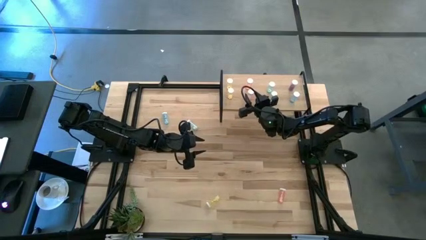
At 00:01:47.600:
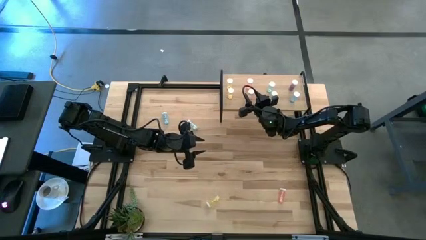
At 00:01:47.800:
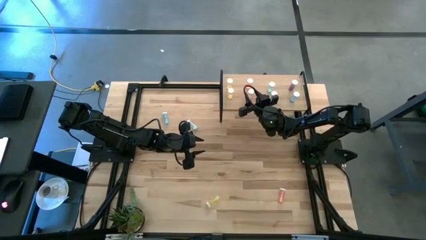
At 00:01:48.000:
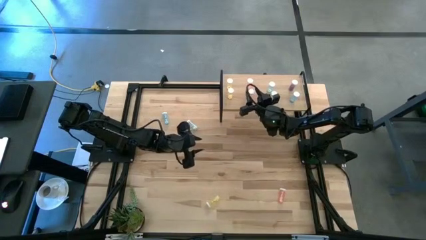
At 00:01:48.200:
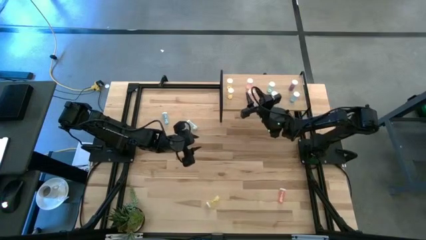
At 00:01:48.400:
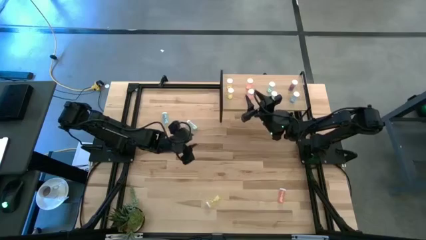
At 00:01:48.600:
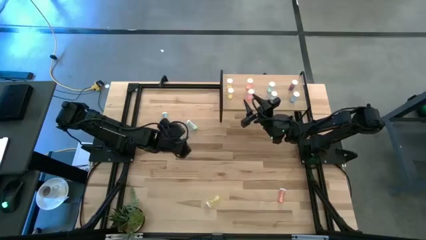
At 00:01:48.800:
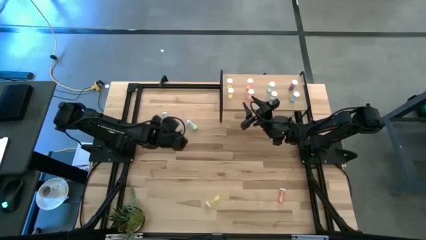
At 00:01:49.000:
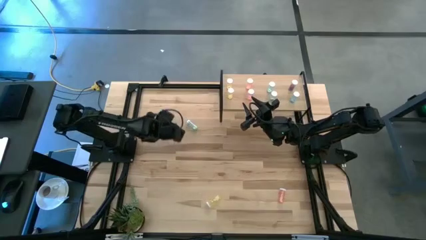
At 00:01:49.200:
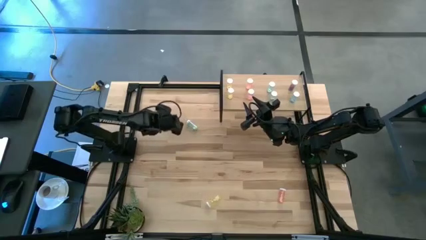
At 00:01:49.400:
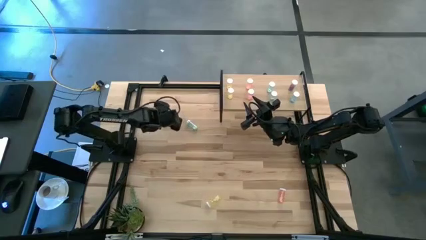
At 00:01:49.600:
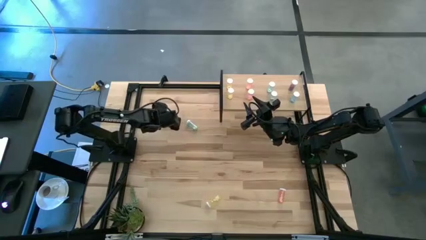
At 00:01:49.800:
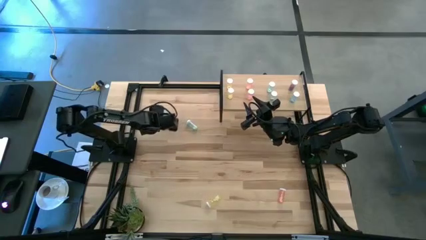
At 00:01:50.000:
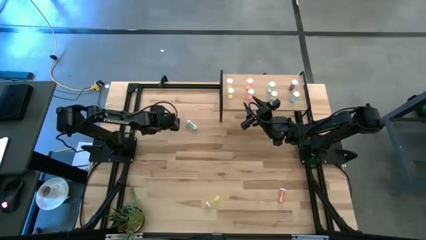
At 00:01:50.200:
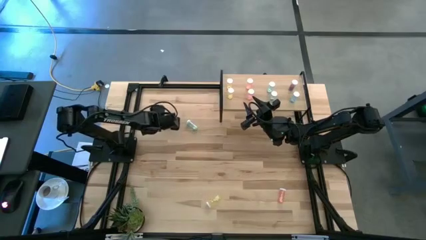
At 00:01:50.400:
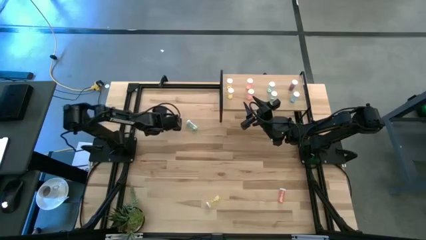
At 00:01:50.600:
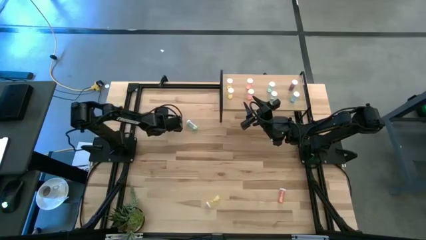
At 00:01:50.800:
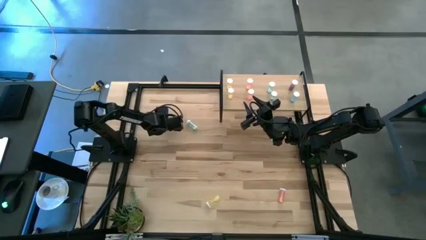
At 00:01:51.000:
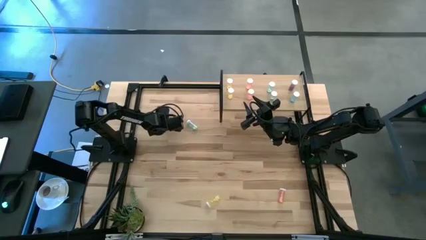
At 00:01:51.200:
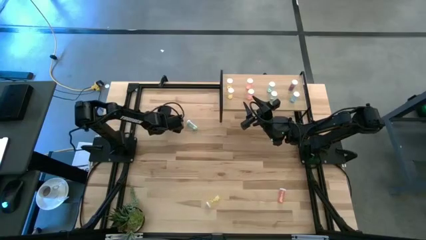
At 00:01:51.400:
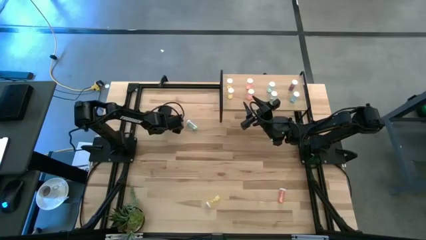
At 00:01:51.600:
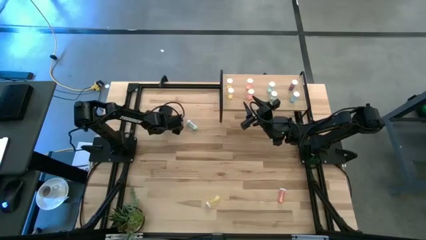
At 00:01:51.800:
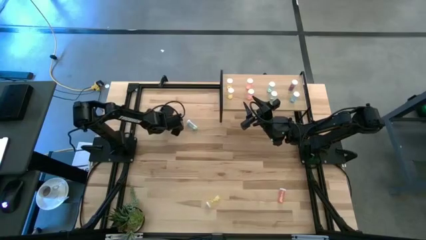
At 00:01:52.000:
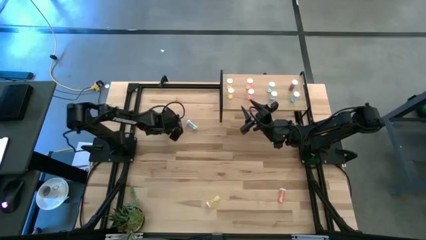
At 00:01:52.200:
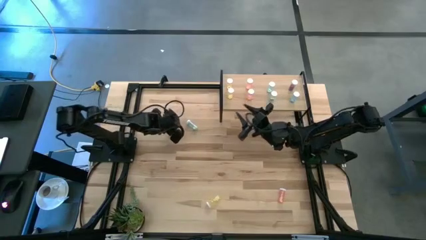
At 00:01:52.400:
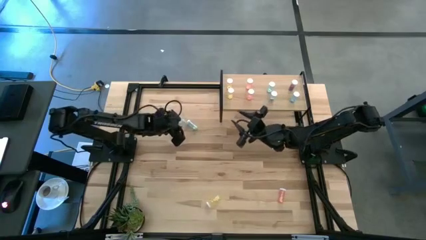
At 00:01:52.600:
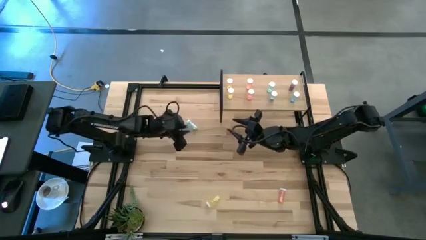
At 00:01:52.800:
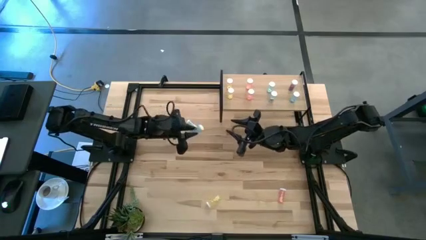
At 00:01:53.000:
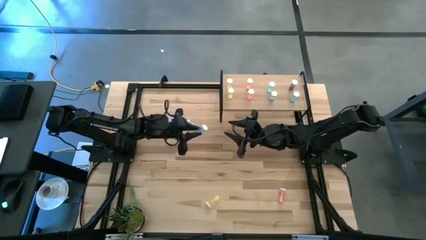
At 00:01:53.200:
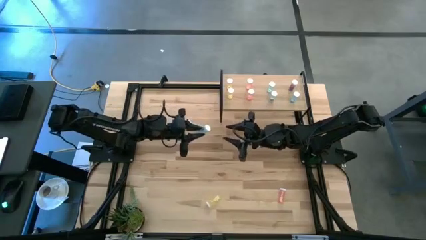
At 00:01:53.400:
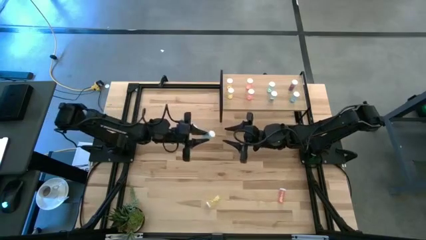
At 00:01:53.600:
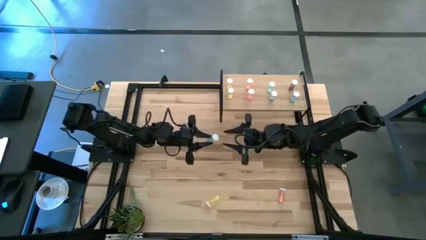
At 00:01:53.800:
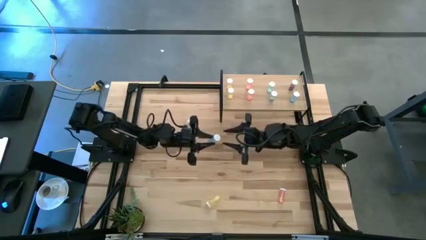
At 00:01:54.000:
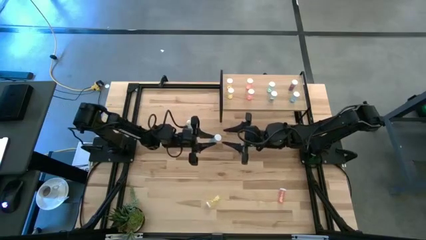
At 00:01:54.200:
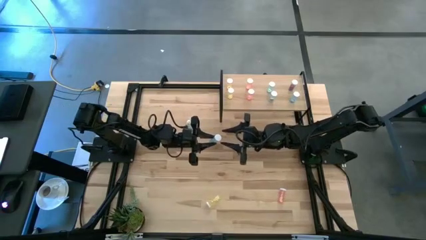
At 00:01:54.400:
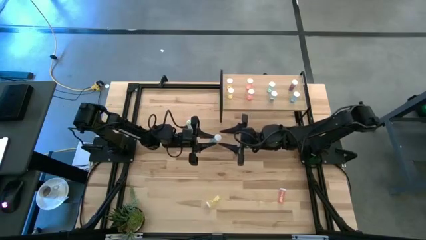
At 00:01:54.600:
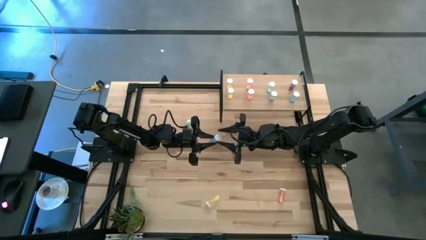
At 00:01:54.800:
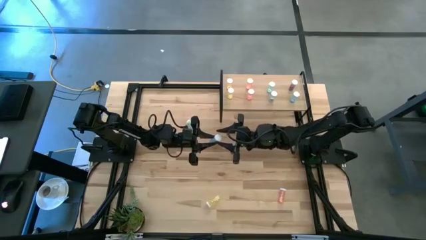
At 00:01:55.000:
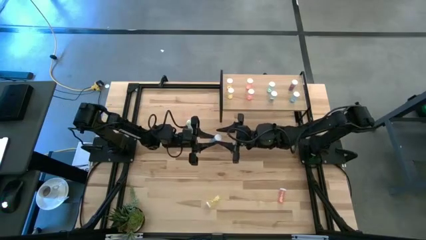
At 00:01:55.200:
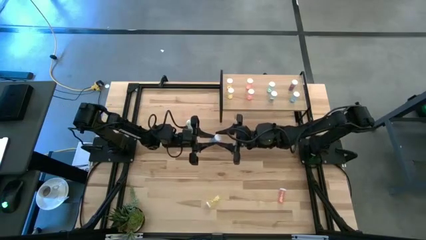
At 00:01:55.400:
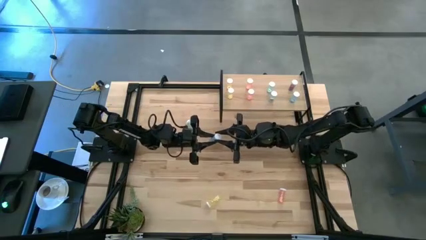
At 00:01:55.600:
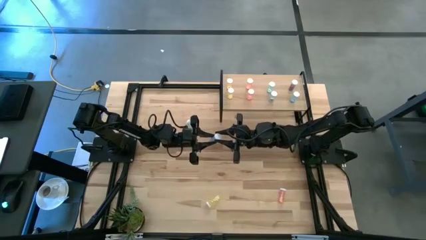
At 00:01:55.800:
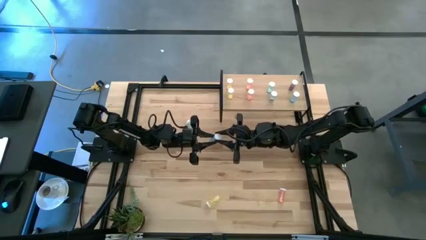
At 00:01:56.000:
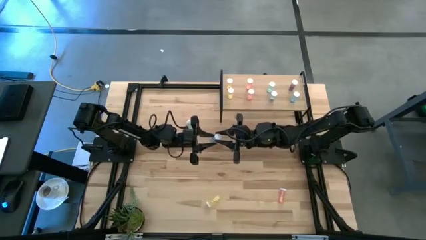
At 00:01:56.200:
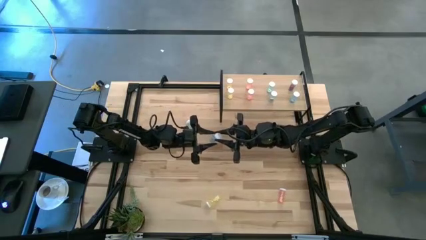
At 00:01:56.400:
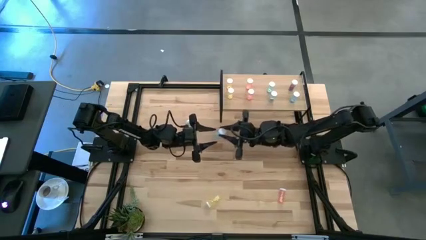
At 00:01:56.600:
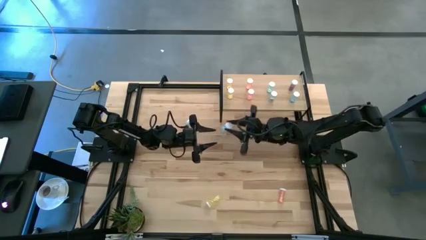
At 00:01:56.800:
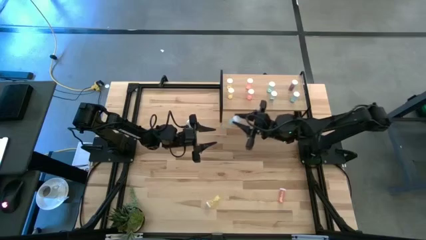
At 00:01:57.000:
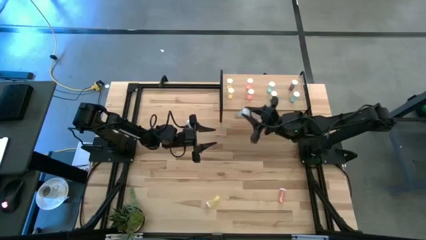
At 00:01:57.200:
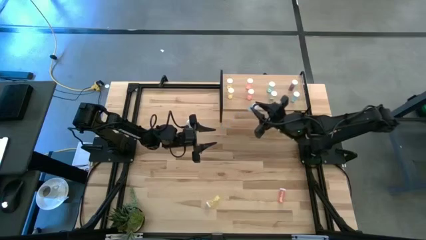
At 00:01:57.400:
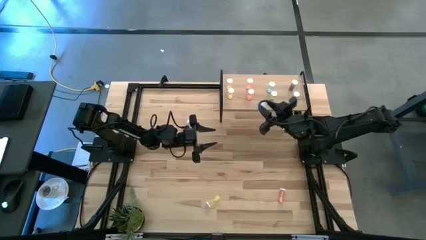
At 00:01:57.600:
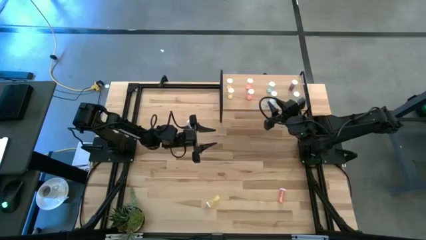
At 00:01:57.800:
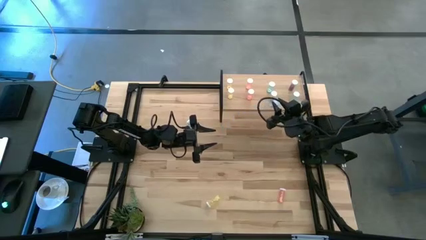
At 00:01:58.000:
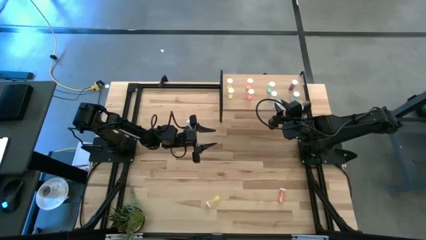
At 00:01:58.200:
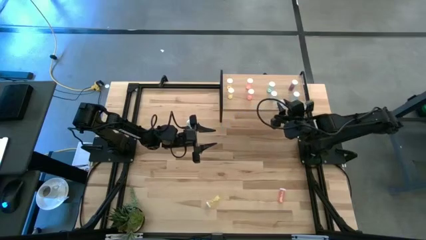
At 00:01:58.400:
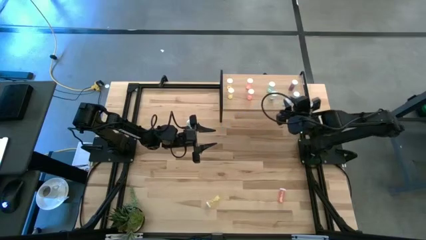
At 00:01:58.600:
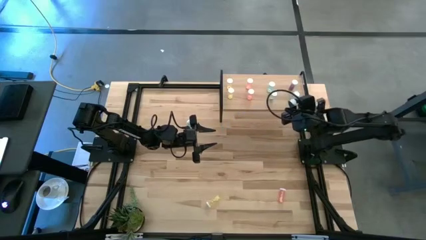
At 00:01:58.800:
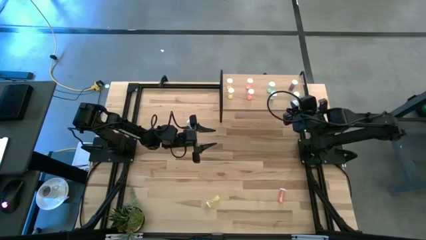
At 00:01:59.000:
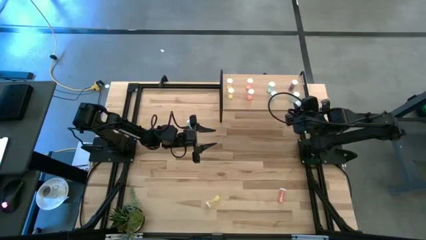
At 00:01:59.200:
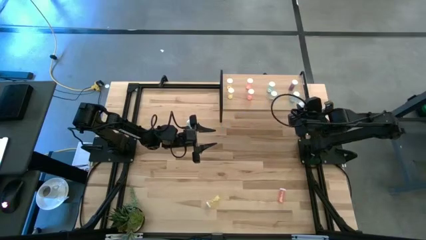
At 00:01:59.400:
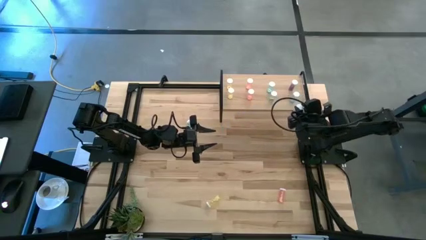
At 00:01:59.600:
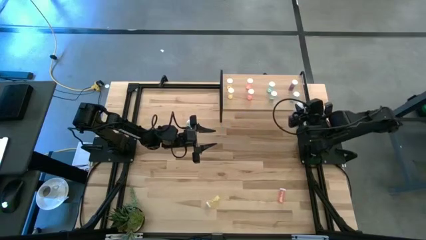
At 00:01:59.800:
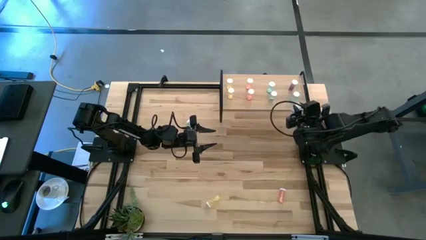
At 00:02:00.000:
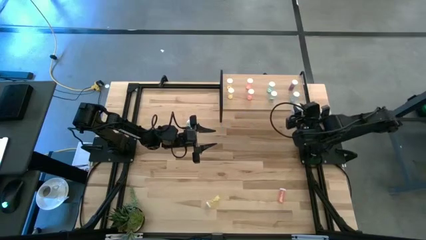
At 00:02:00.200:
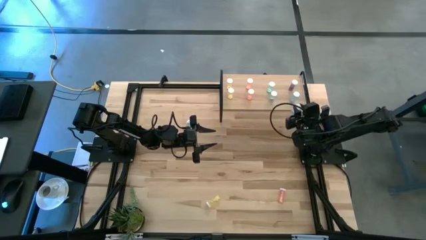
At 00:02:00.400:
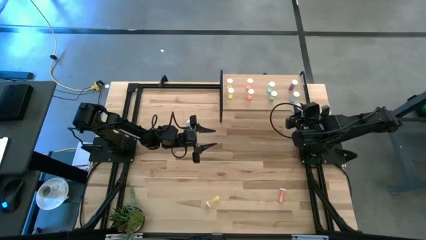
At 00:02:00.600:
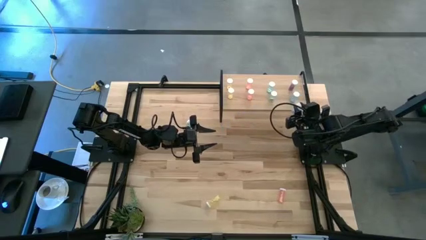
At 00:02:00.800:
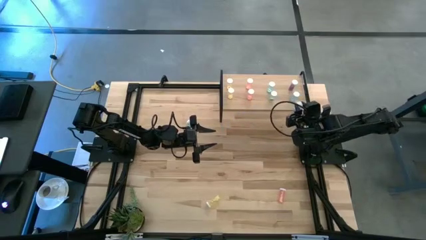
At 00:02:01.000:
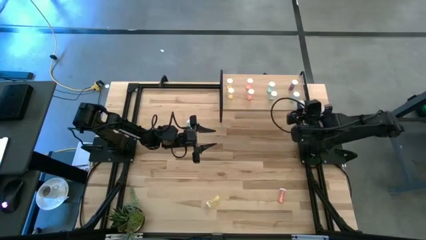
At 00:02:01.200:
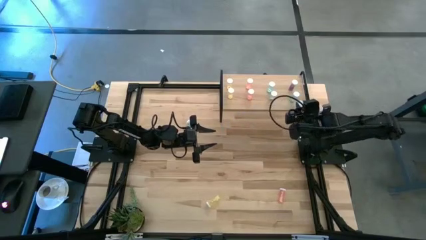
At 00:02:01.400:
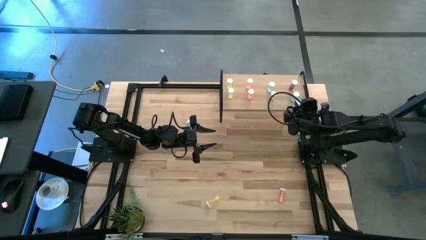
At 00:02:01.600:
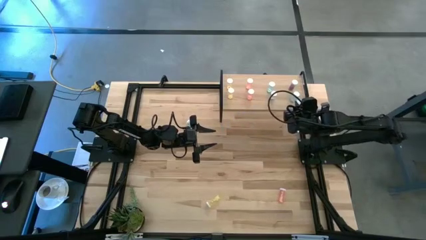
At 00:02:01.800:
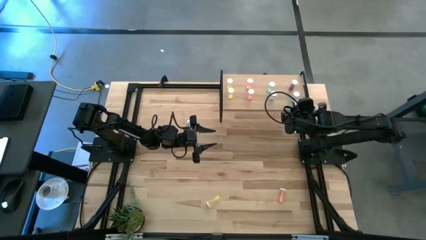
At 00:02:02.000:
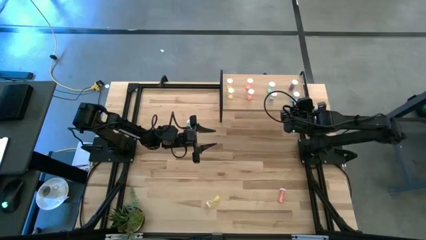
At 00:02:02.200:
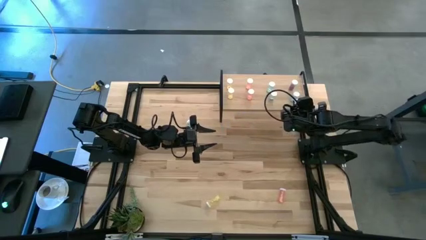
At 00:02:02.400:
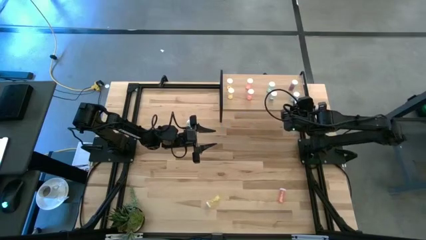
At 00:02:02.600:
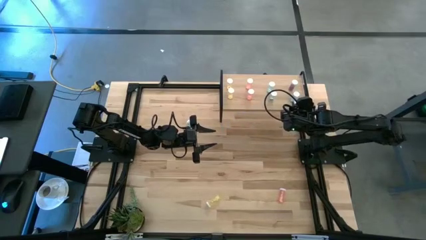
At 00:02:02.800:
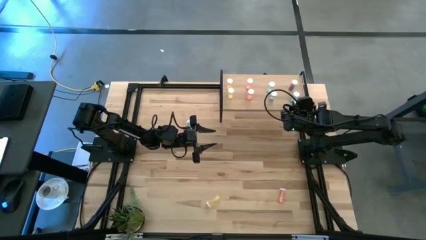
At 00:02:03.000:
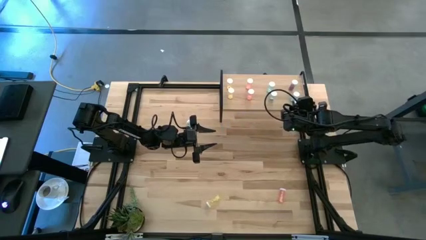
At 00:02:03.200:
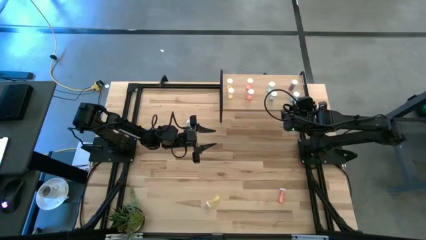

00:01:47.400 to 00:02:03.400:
Task: Pick and place medicine bottles onto shelf by color
Put the blue pill bottle on the shelf aligned with the other blue pill bottle

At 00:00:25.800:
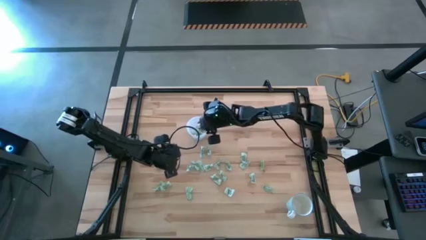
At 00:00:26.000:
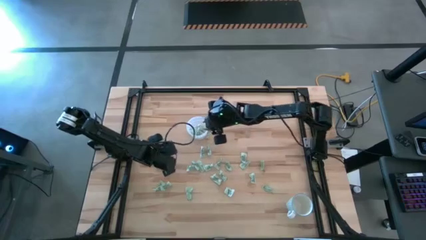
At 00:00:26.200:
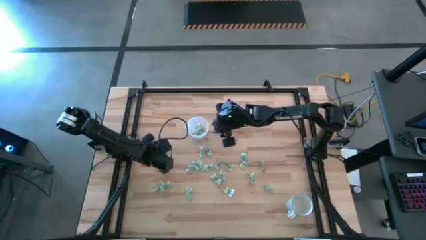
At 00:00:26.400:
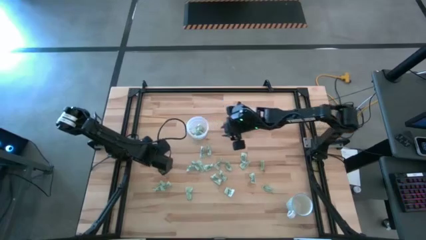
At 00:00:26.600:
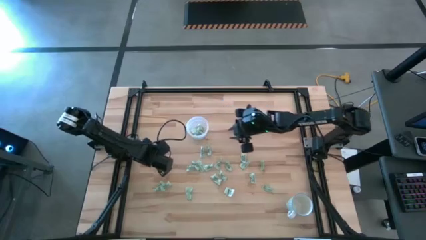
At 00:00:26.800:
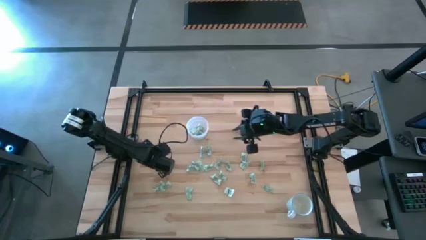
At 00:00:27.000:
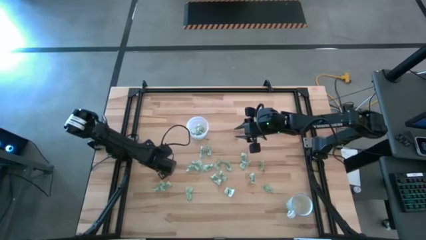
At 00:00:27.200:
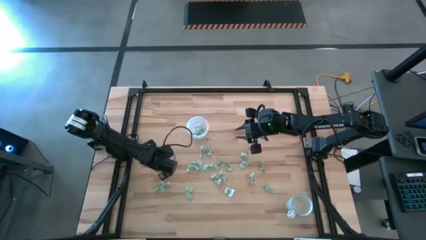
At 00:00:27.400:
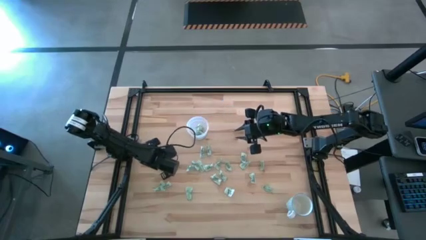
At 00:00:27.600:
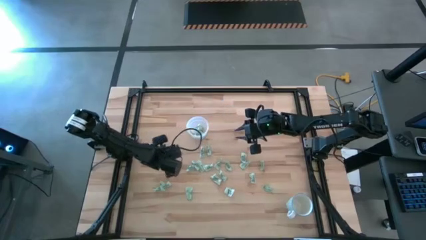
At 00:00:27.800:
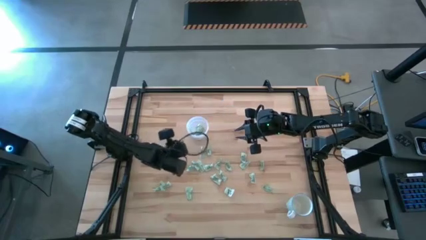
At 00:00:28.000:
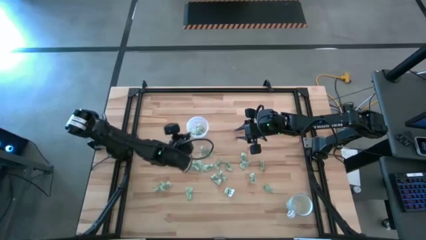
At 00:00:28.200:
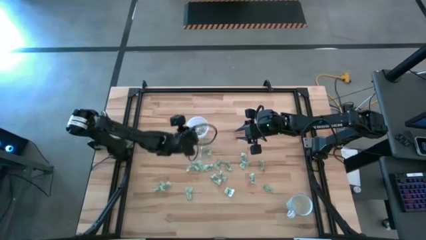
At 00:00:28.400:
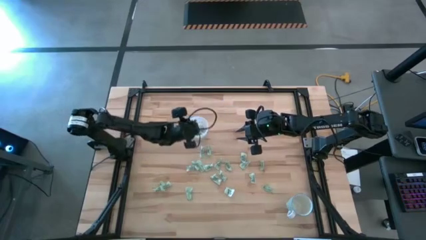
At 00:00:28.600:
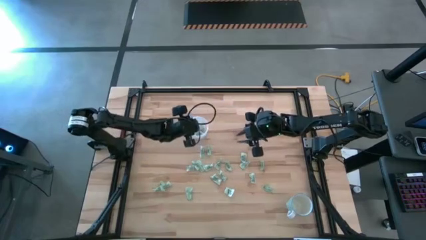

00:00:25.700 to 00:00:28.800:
Task: Pick and place Stevia / Truvia into bins
Put the stevia packet into the transparent container
